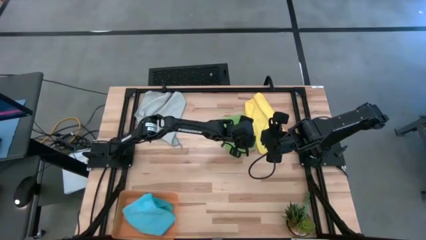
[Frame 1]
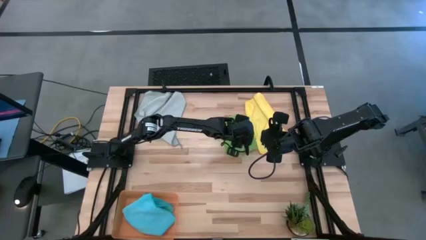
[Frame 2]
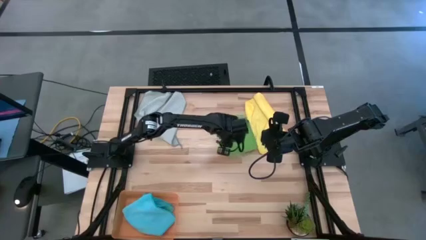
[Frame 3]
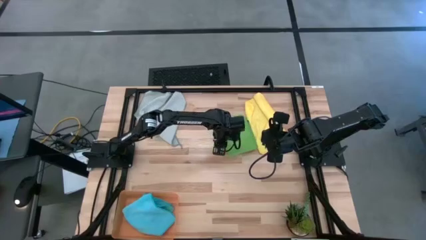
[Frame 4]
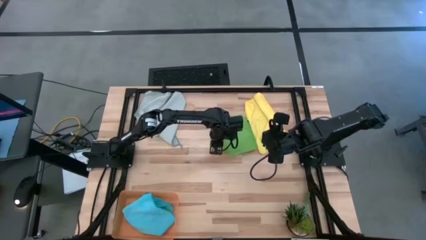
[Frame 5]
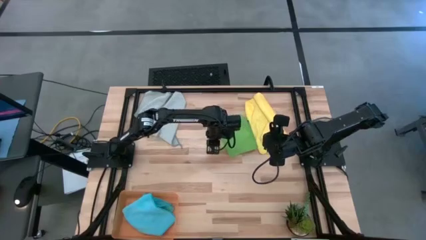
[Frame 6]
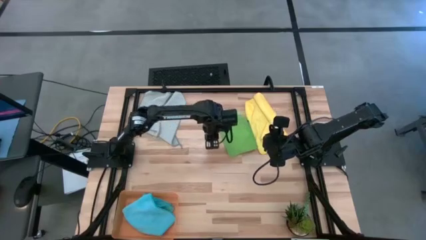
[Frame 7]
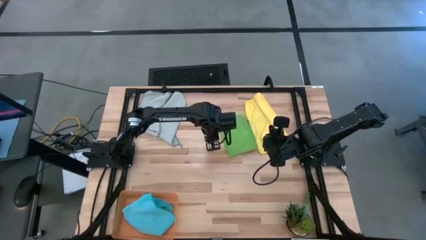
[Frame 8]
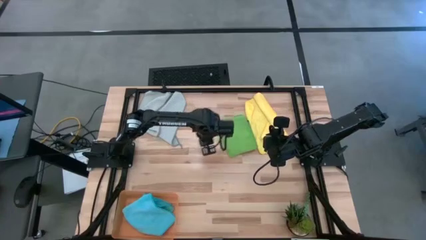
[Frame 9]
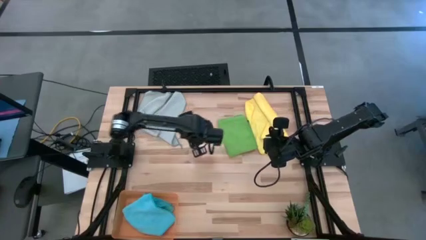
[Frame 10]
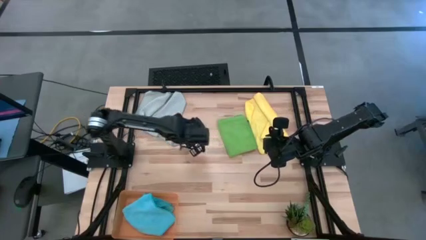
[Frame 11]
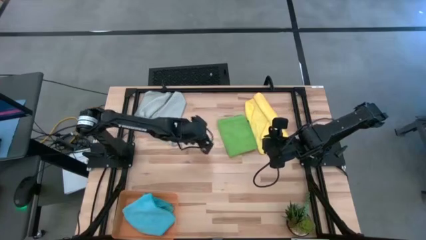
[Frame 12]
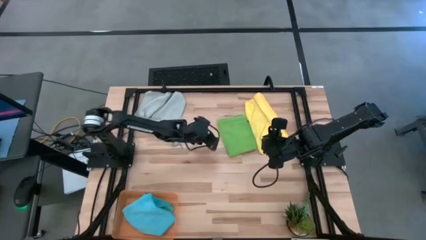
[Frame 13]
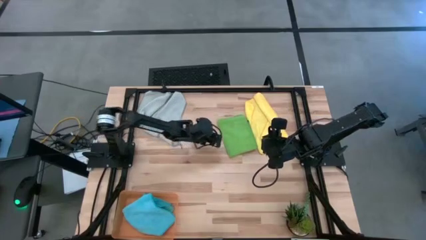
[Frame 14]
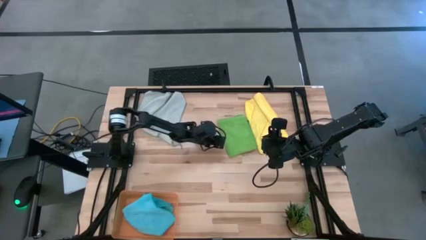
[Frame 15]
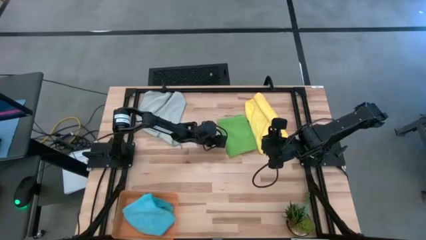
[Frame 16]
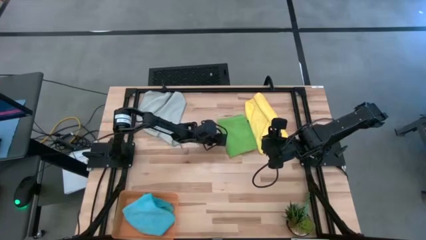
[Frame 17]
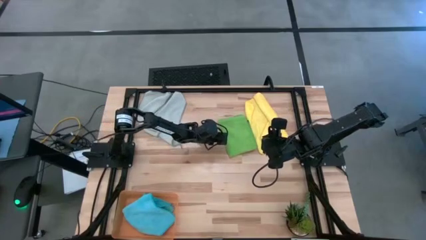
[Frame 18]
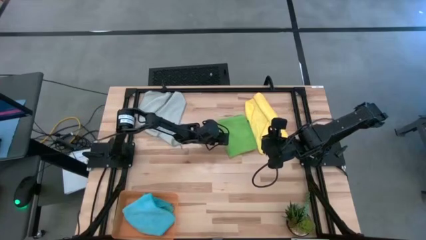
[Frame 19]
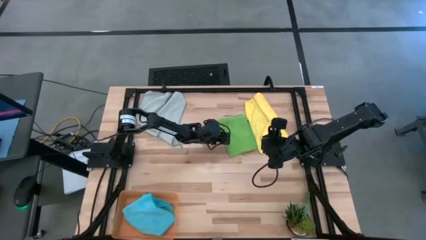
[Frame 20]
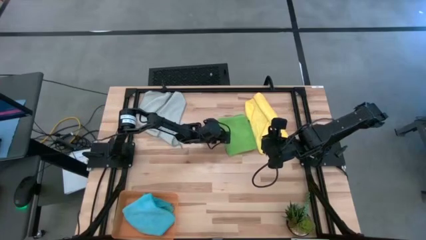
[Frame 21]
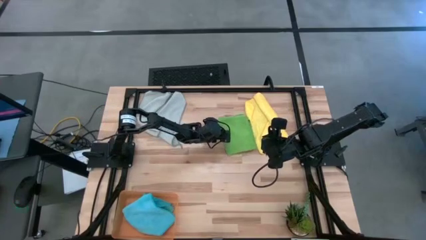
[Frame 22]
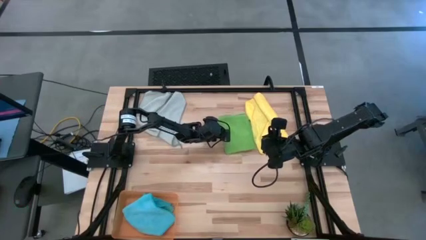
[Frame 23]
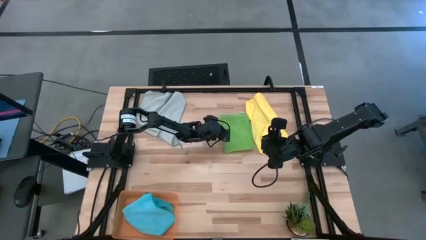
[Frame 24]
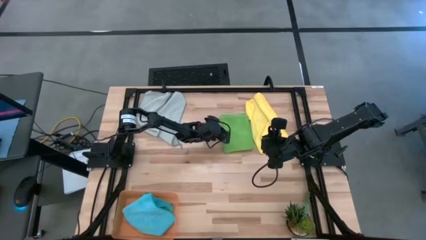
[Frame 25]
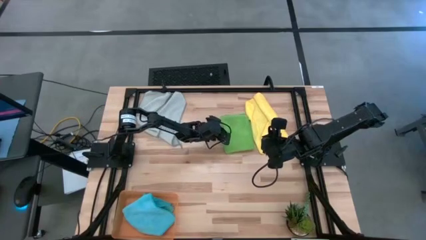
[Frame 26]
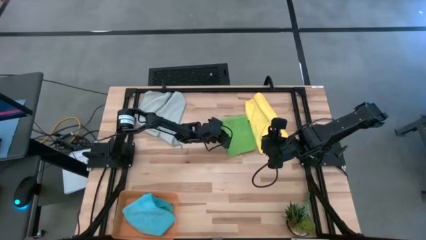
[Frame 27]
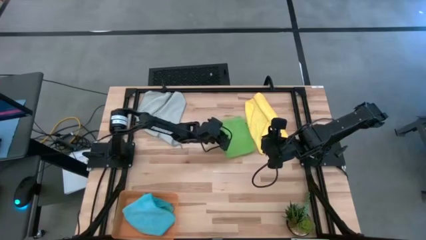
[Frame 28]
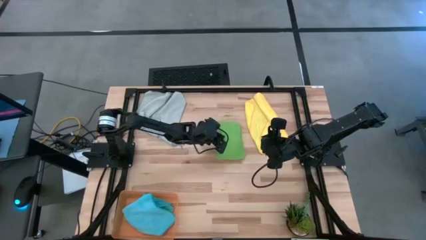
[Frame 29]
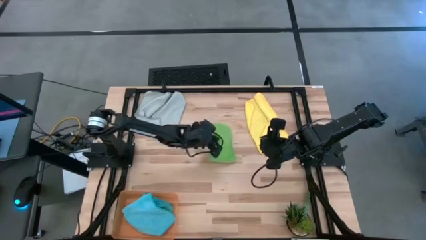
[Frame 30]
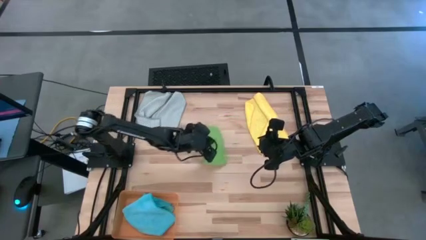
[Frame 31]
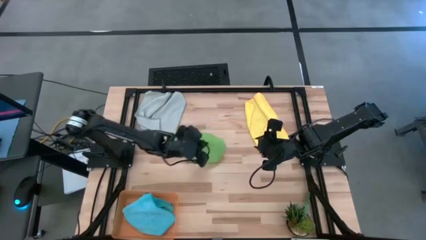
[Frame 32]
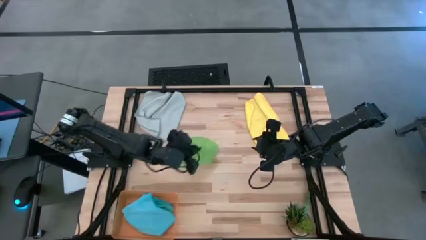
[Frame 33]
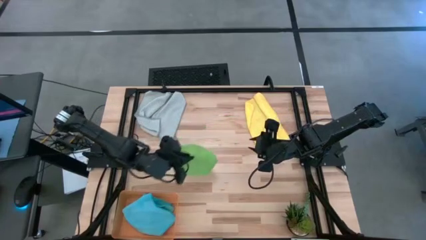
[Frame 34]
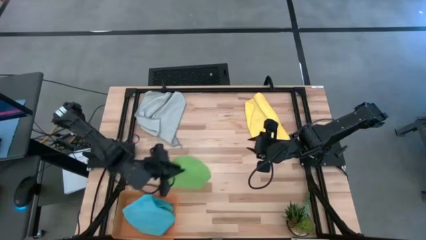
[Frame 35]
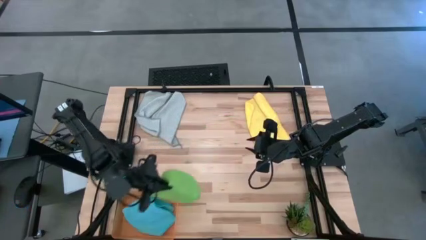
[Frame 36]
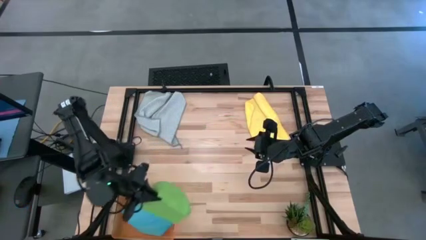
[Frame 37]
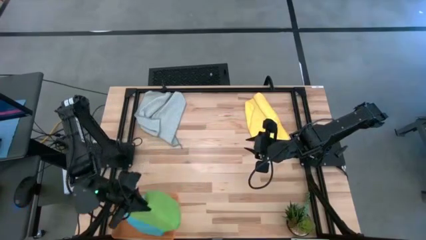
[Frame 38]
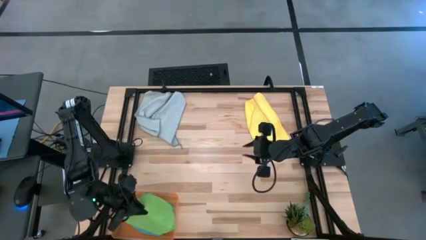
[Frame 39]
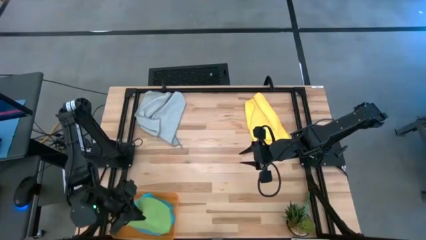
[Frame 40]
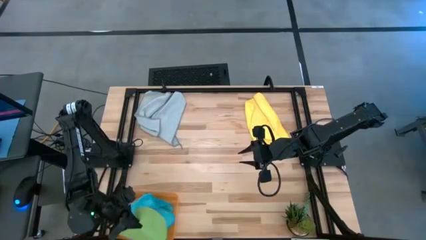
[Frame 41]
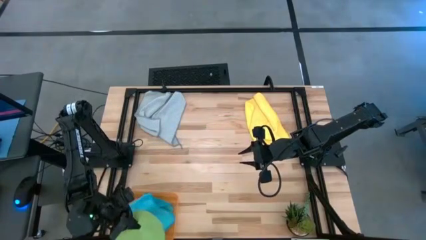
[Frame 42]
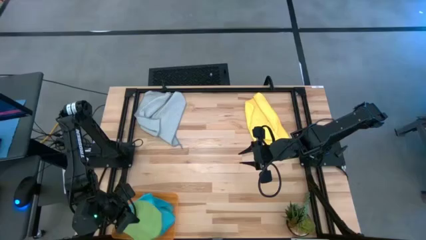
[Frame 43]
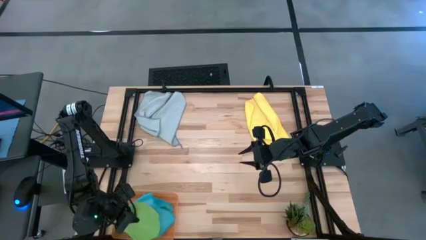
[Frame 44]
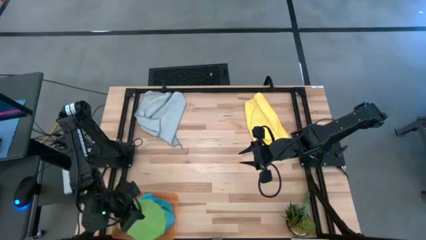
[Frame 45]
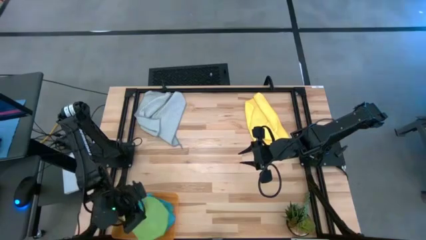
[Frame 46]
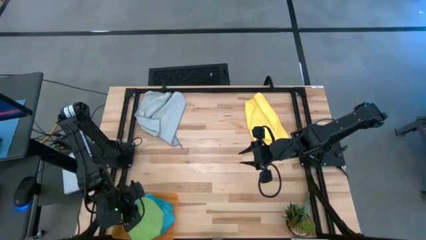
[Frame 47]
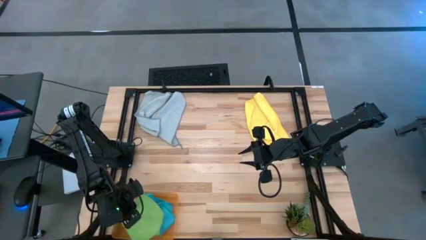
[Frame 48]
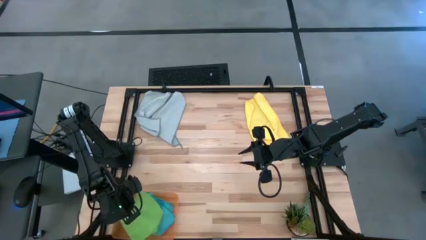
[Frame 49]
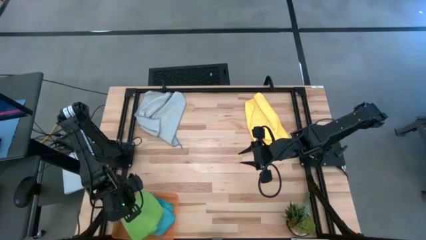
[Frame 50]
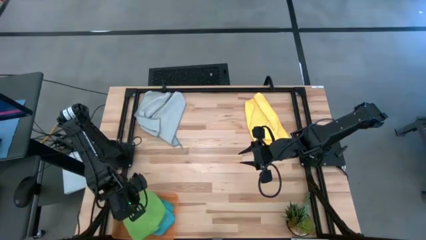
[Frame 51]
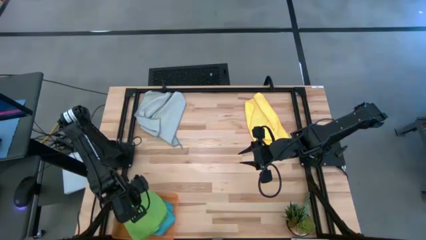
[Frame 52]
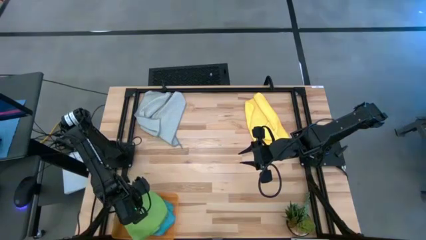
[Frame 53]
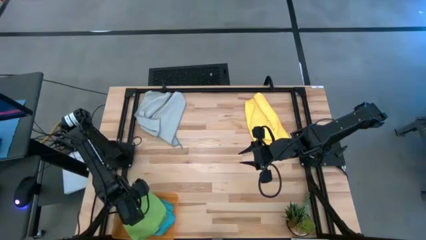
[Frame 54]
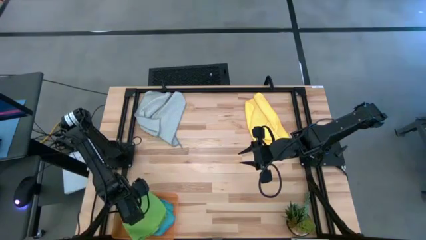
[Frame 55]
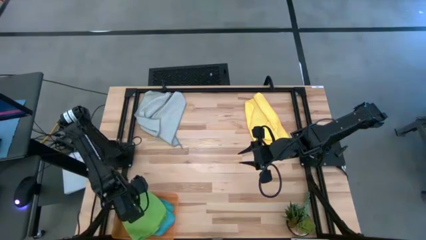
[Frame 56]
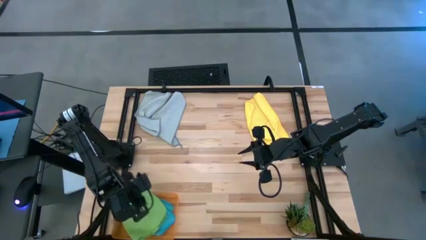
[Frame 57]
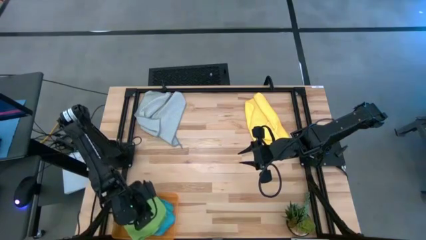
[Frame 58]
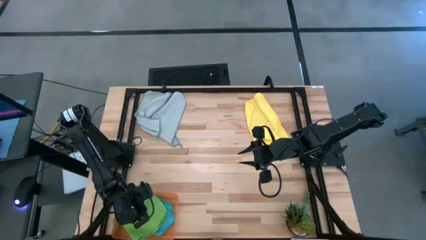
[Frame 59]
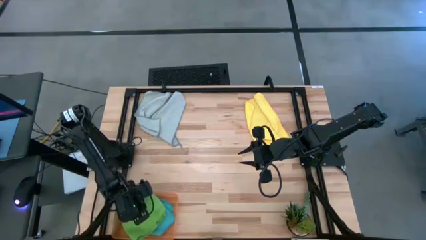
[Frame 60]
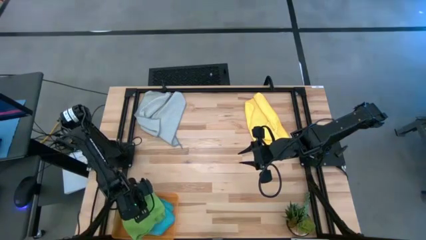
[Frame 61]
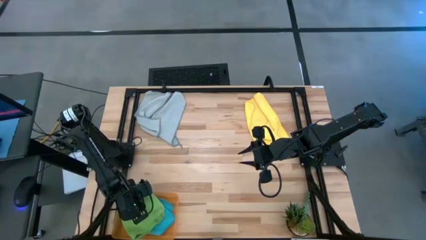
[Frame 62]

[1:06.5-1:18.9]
Task: Fold microfiber towels
Put the green microfiber towel into the orange bin

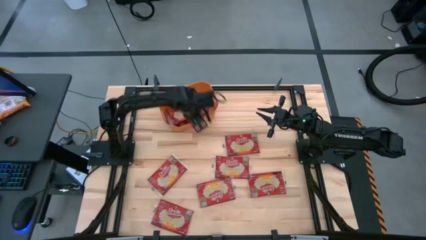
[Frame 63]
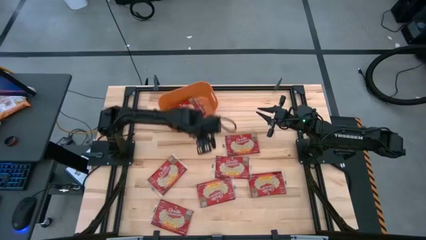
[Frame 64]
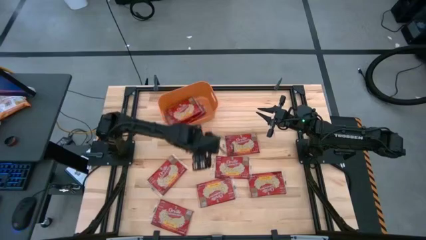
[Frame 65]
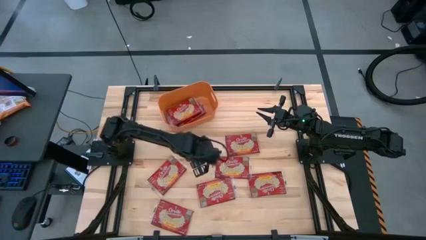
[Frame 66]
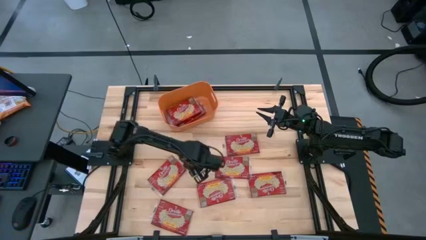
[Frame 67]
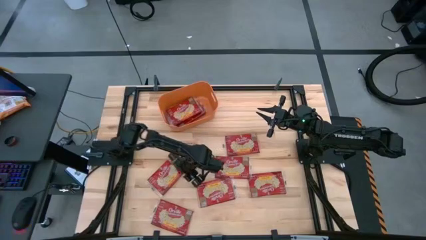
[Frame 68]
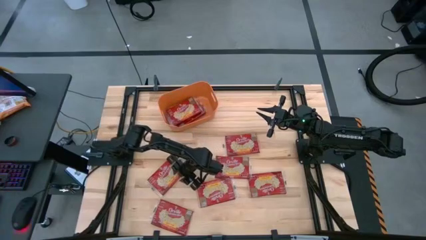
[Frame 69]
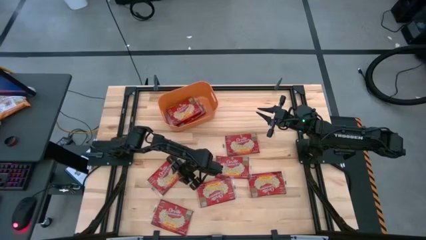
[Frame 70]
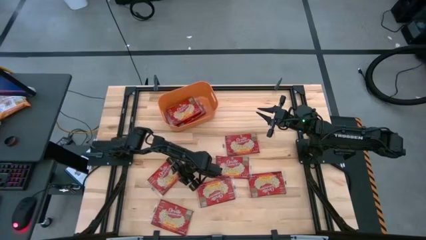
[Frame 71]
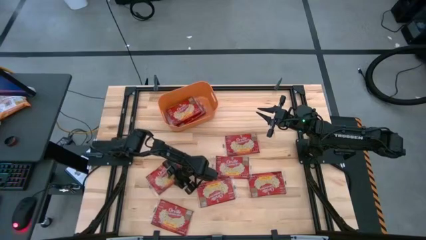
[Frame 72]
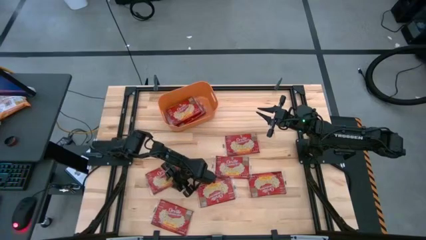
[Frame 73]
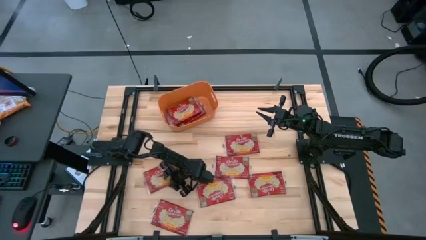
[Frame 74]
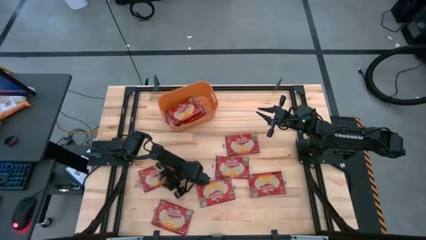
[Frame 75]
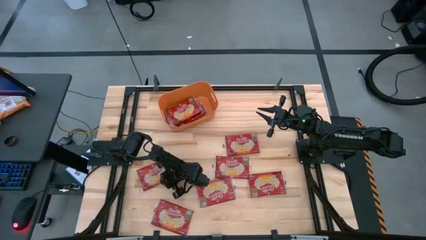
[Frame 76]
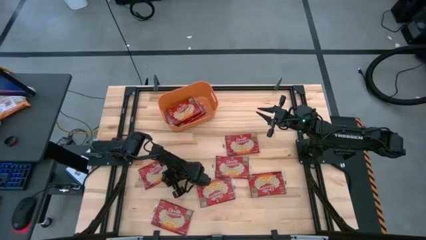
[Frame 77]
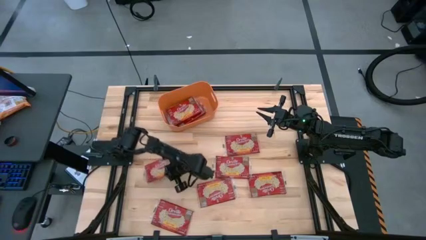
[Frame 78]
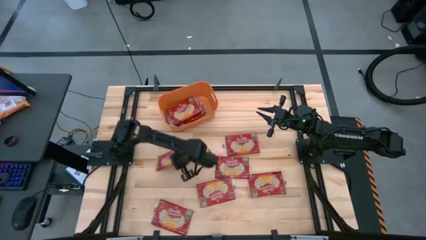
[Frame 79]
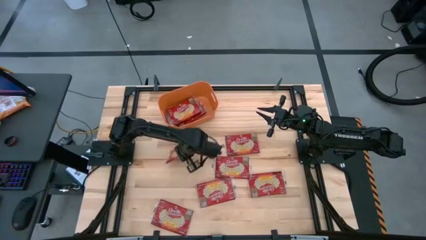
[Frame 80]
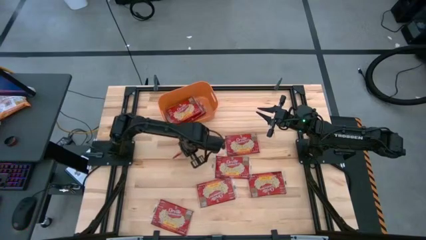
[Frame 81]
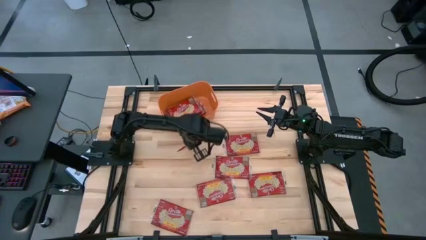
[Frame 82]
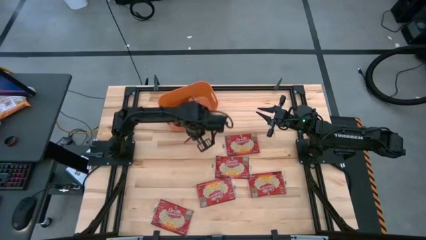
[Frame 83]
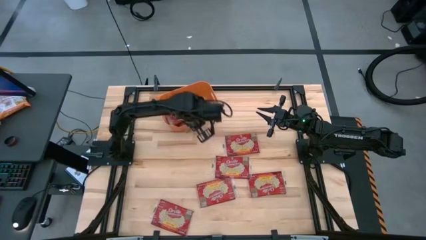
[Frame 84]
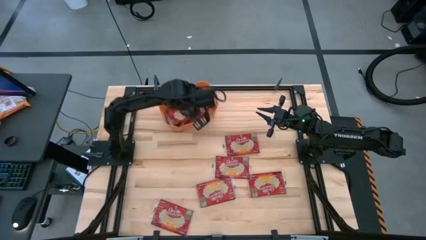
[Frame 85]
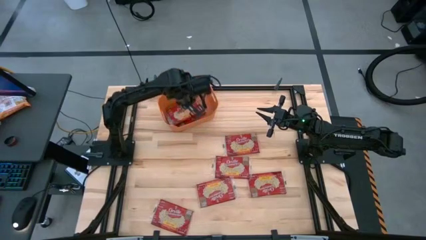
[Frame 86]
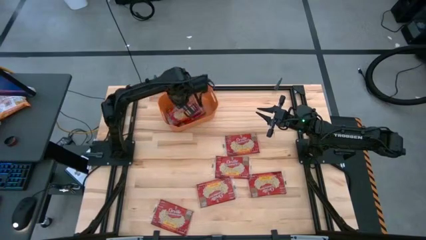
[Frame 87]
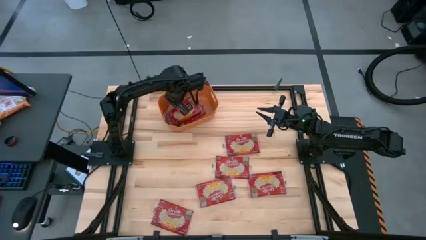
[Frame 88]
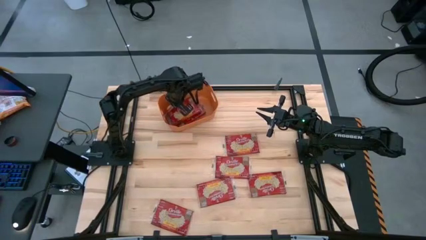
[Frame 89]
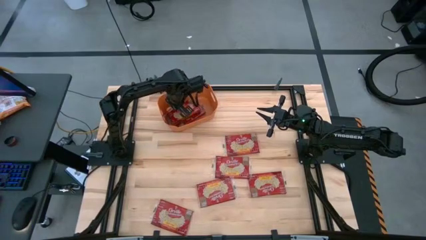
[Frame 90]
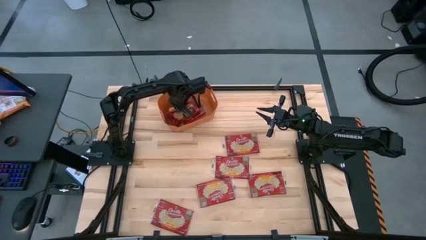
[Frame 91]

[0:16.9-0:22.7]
Task: Sort popcorn bags into baskets
Put the red popcorn pack into the orange bin
